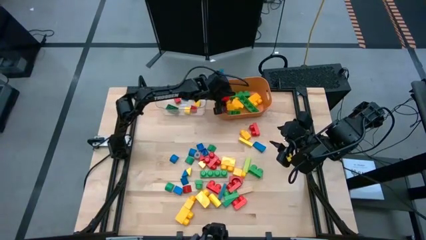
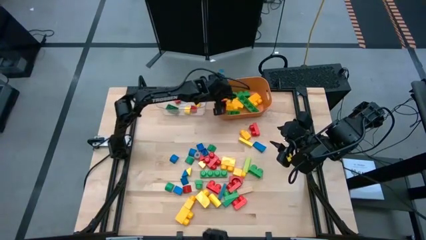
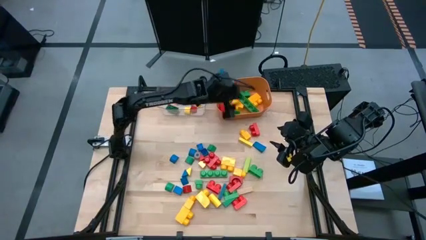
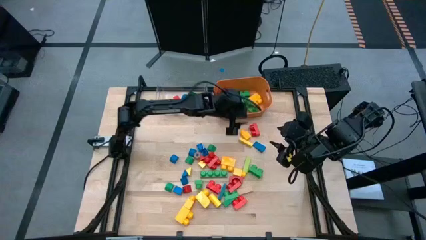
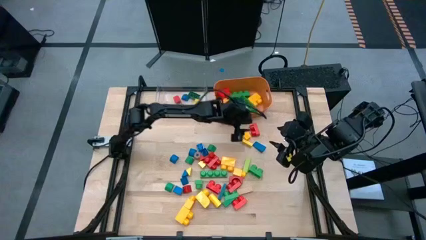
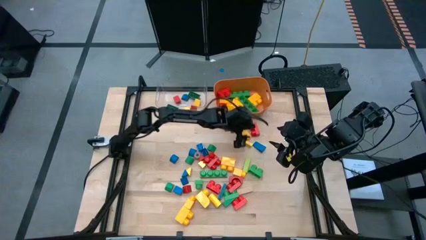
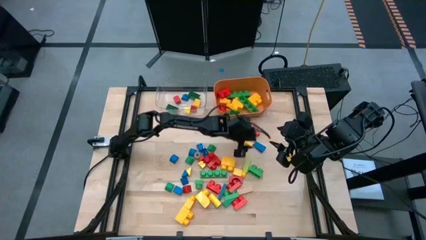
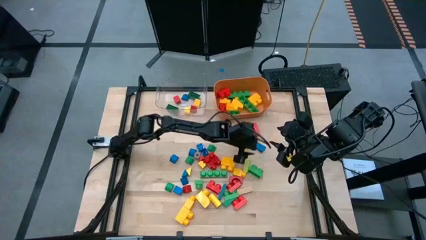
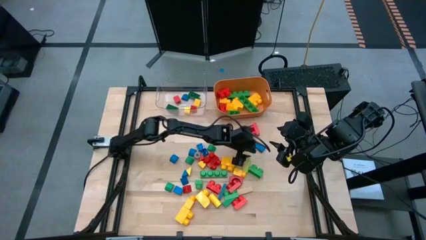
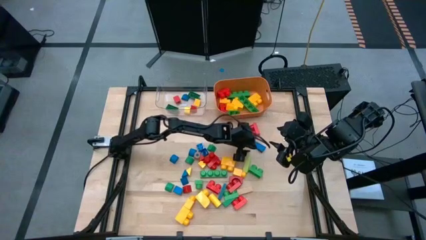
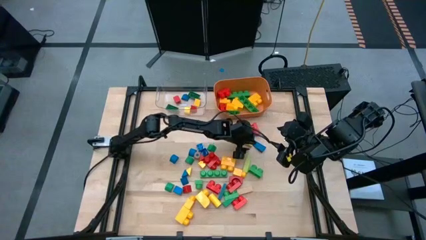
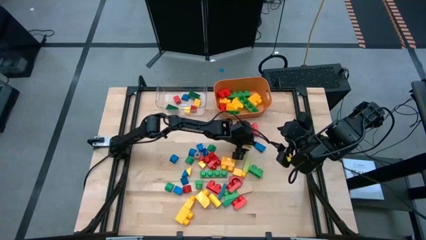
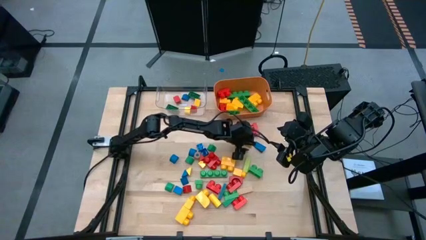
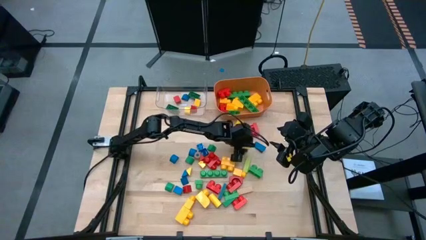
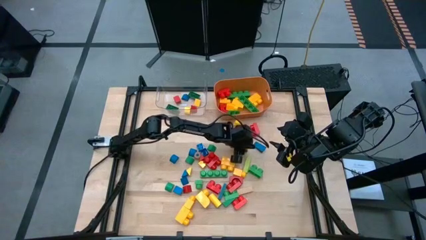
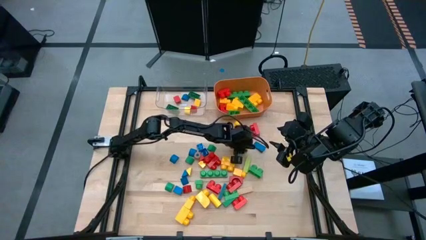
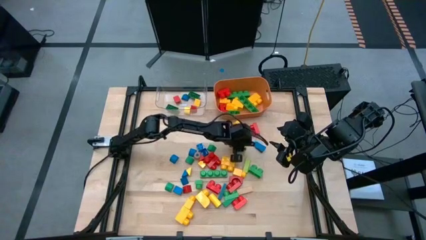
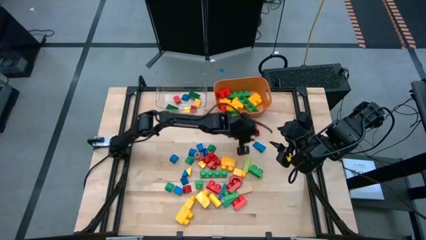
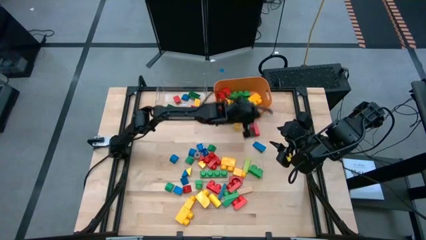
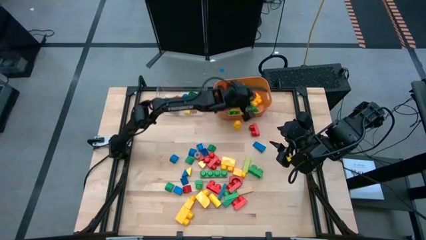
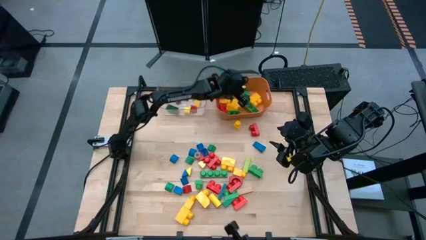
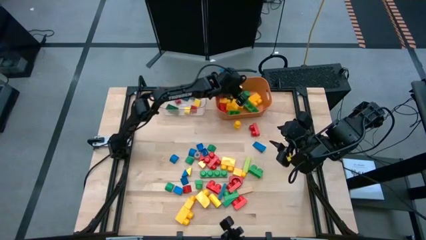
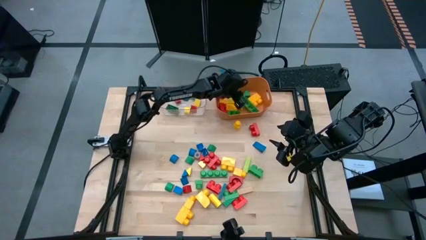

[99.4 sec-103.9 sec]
Task: Sort blocks by size
Put the big yellow block into the orange bin

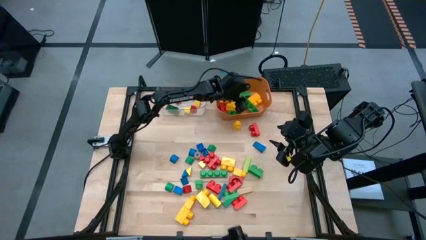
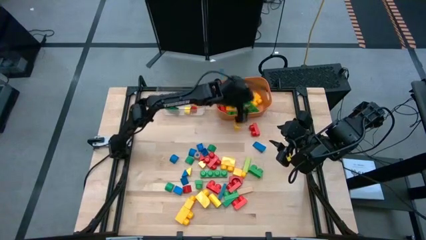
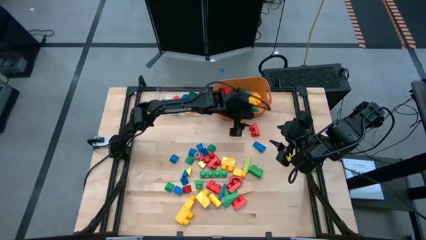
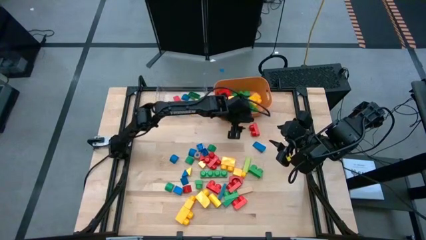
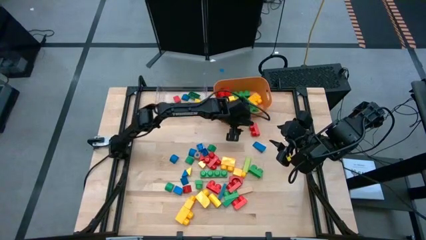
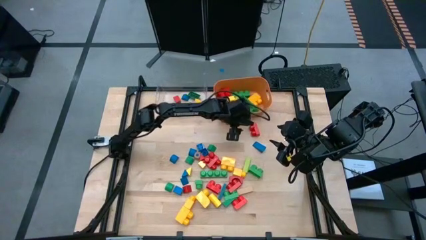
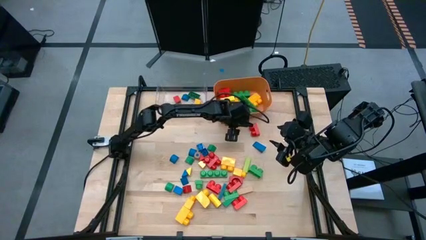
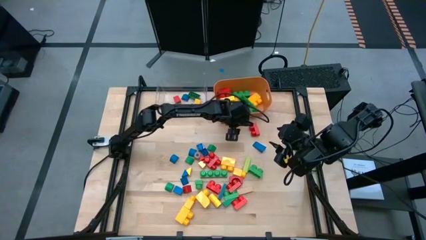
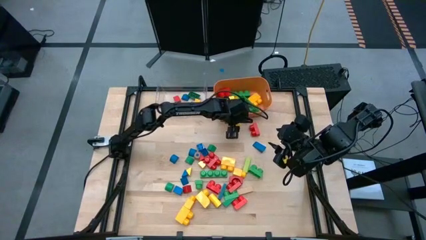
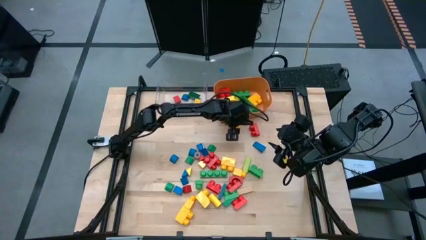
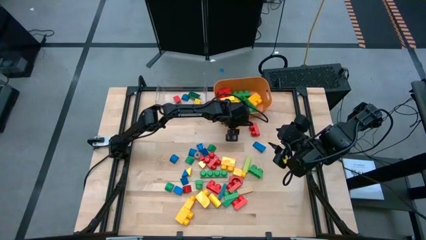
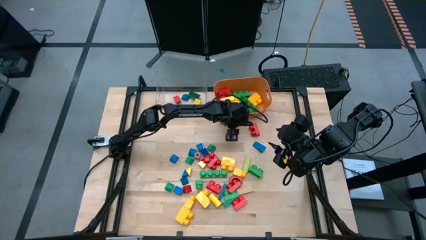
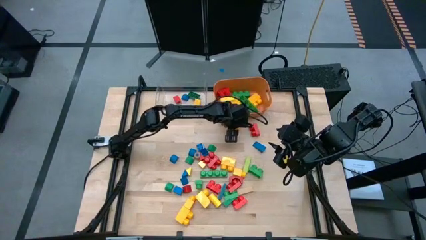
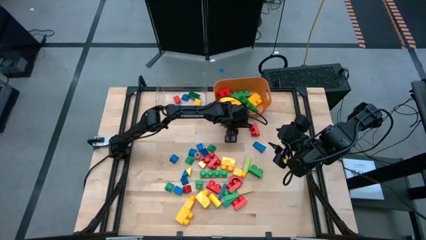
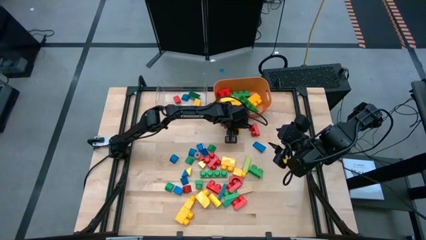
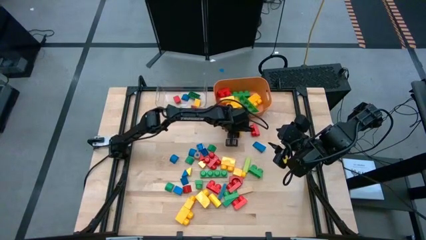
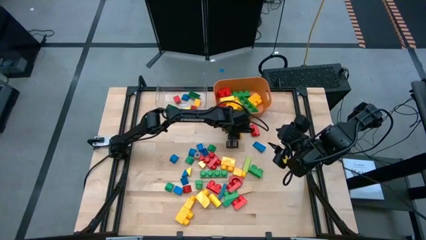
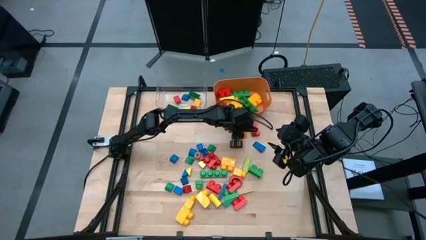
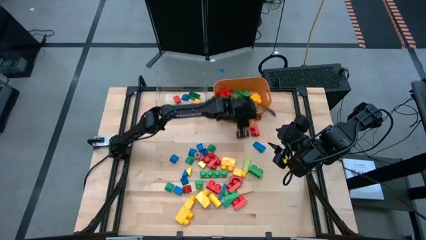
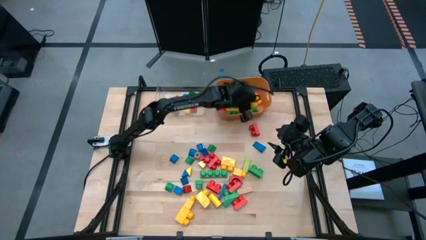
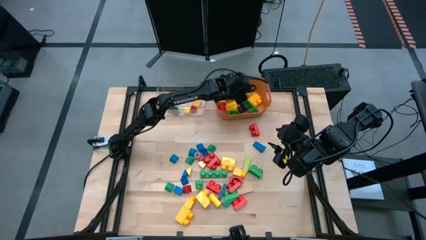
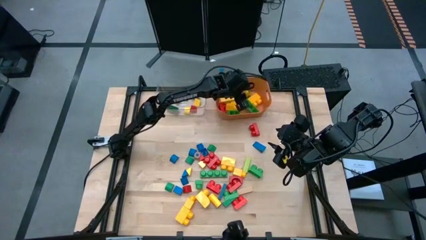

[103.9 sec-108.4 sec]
Put the big yellow game piece into the orange bin

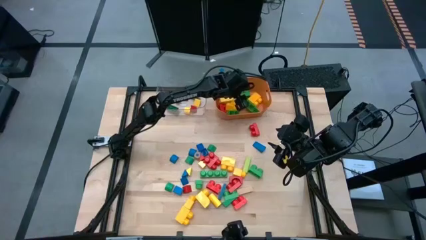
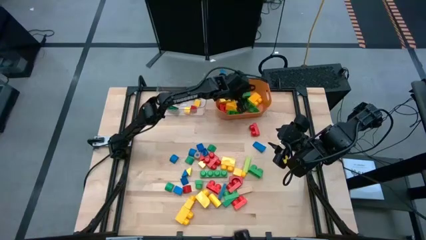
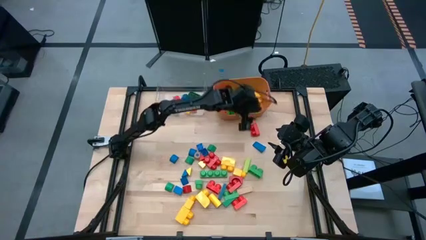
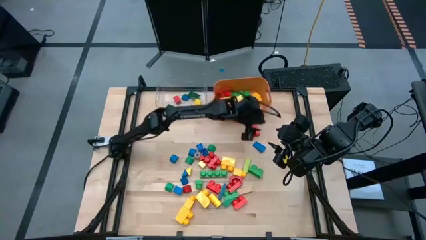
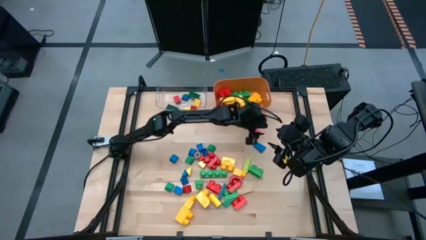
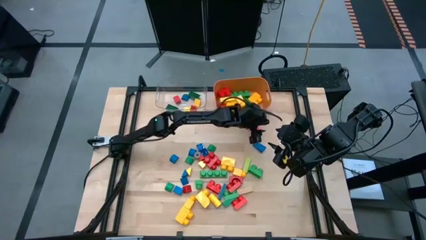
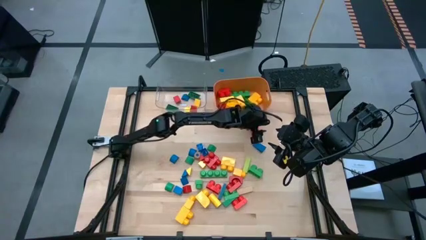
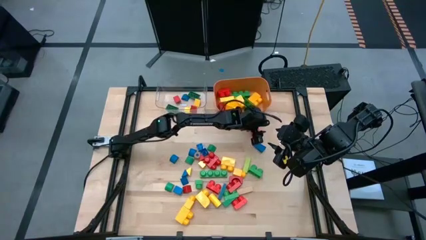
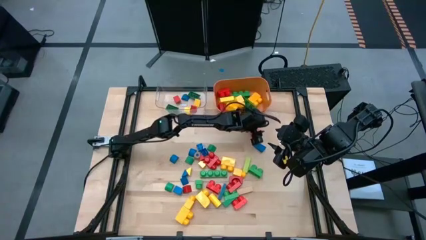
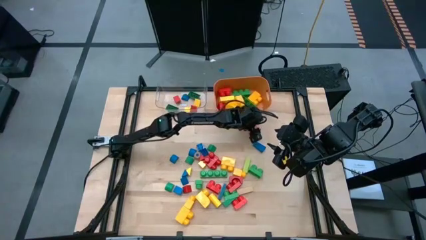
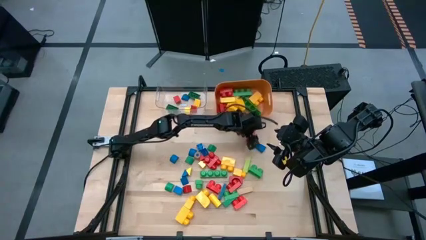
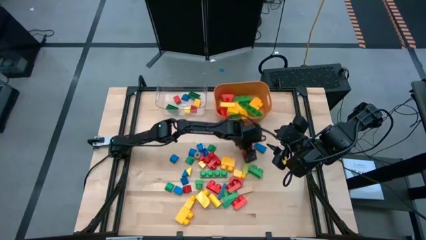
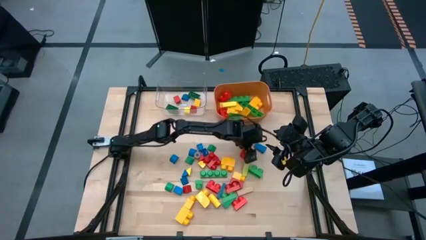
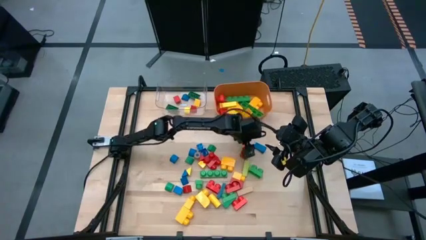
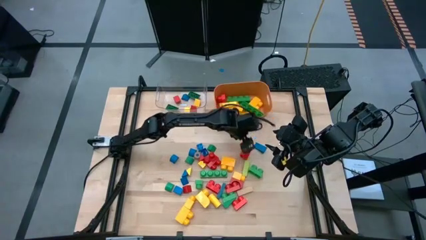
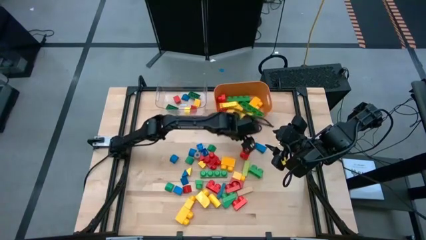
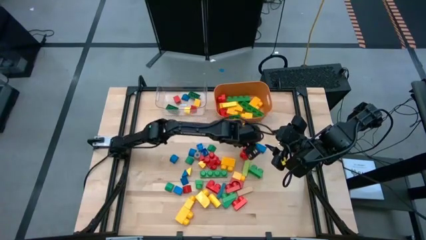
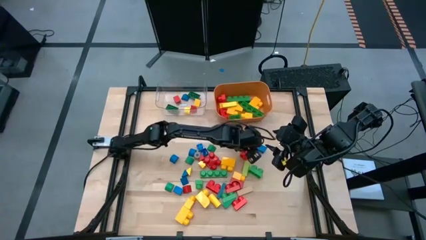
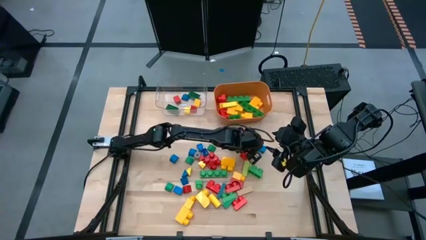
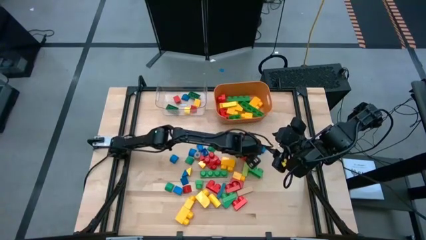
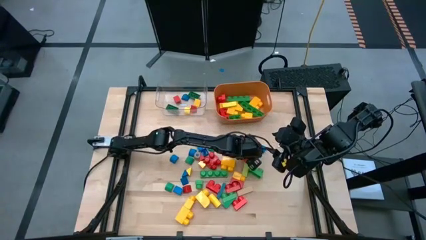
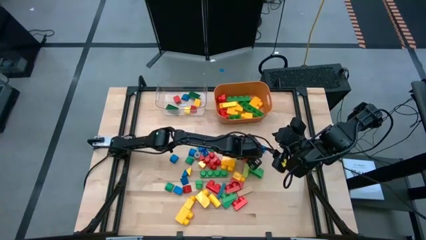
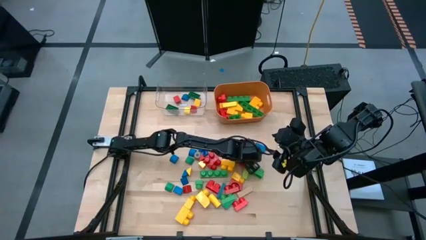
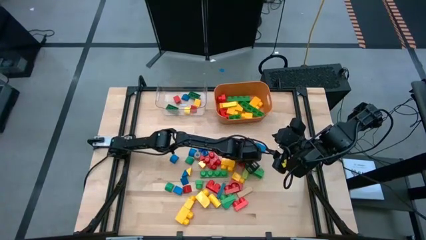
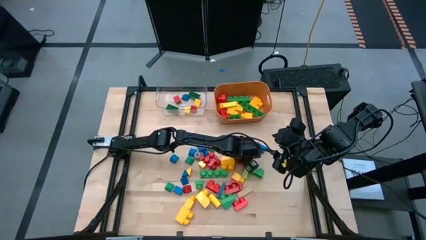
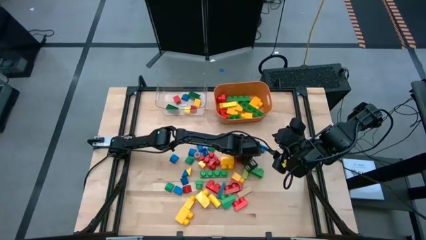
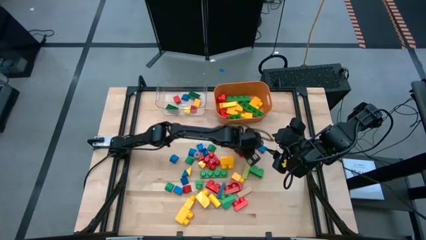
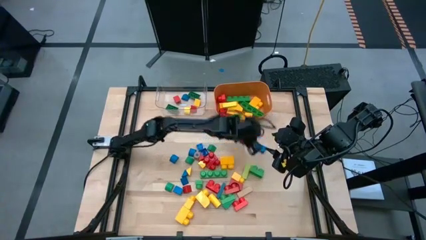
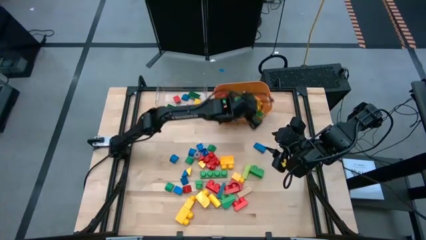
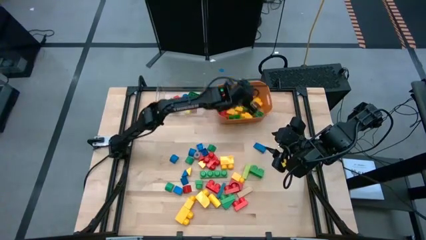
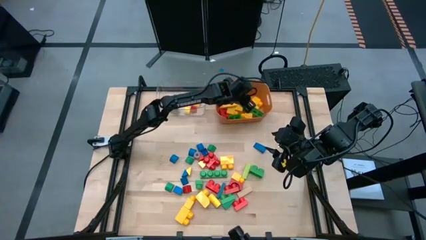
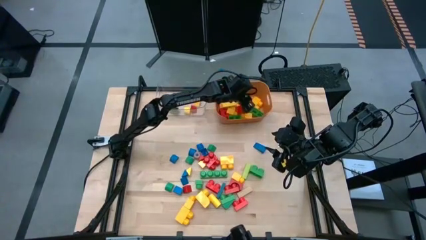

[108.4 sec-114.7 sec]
Put the big red game piece into the orange bin
